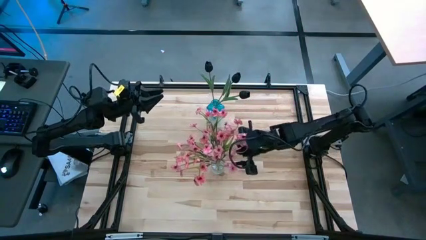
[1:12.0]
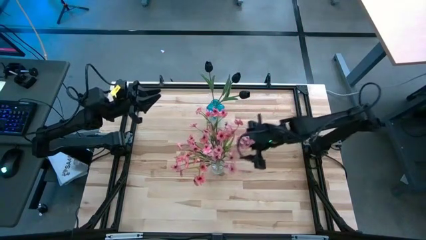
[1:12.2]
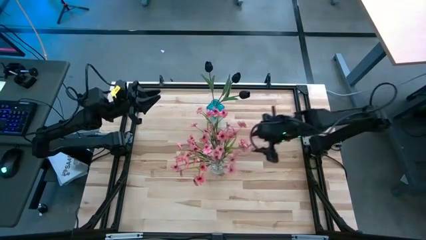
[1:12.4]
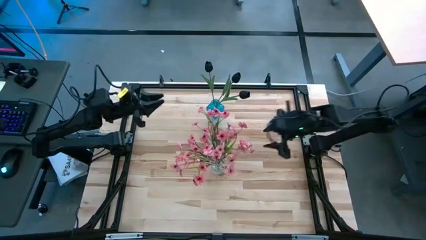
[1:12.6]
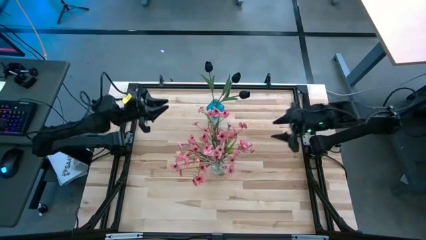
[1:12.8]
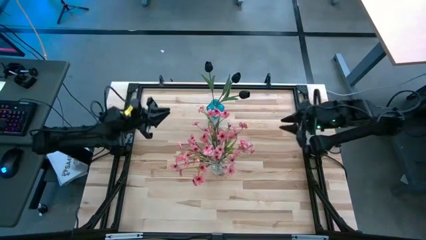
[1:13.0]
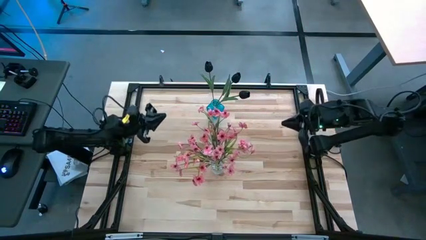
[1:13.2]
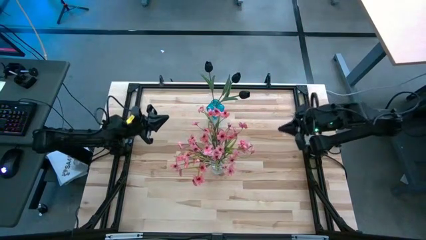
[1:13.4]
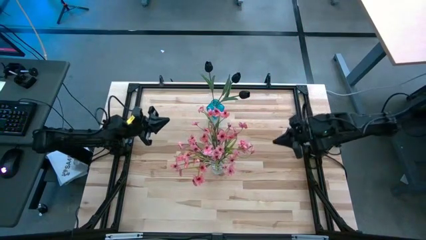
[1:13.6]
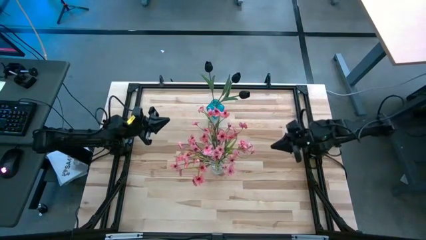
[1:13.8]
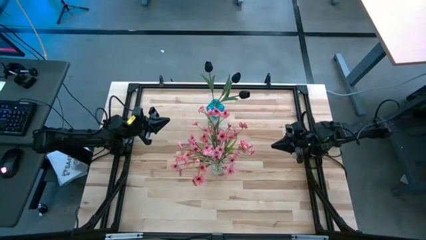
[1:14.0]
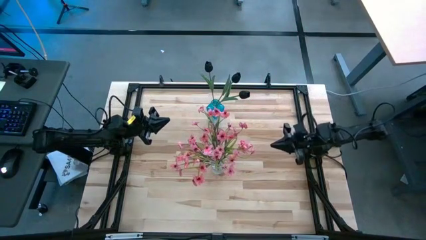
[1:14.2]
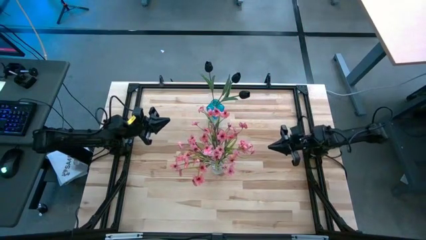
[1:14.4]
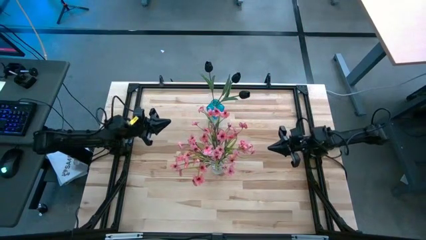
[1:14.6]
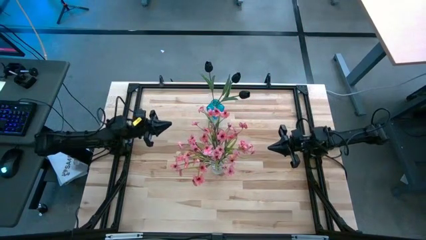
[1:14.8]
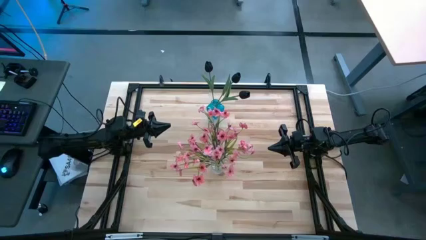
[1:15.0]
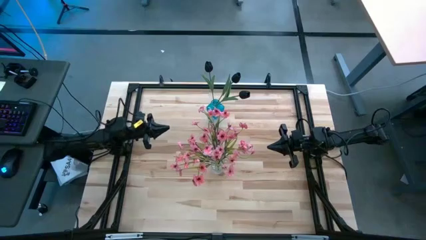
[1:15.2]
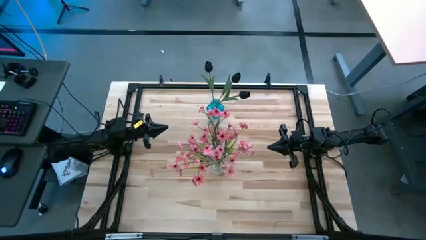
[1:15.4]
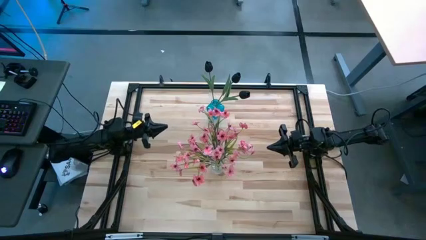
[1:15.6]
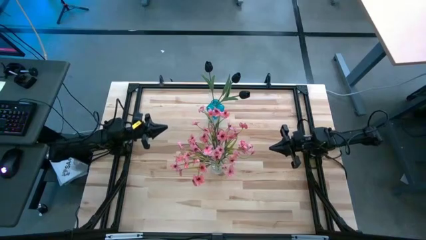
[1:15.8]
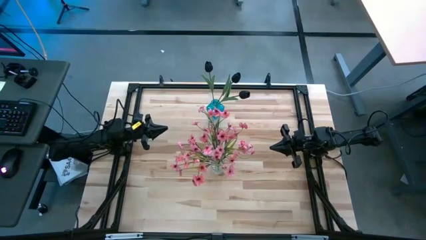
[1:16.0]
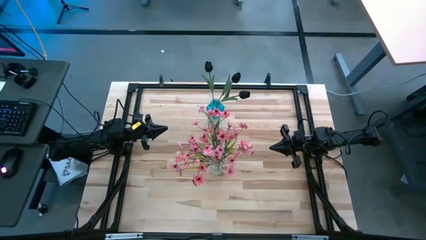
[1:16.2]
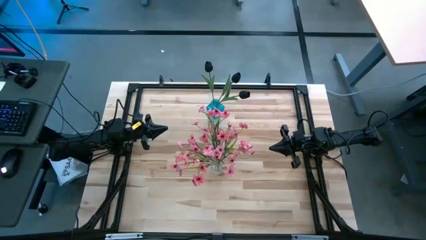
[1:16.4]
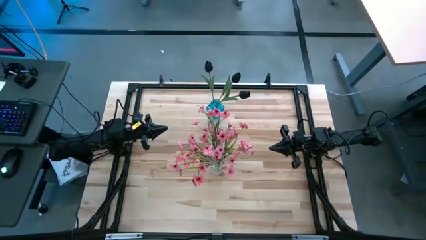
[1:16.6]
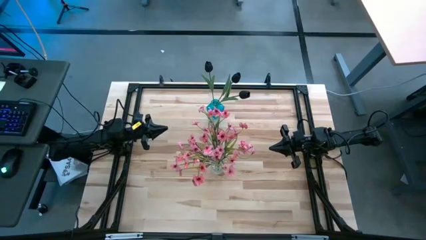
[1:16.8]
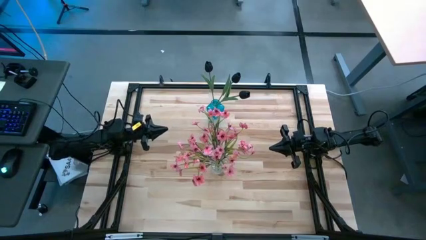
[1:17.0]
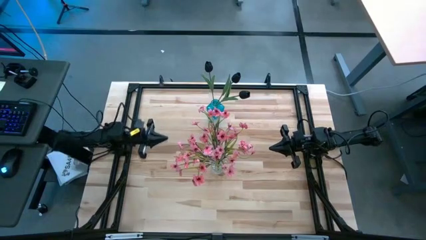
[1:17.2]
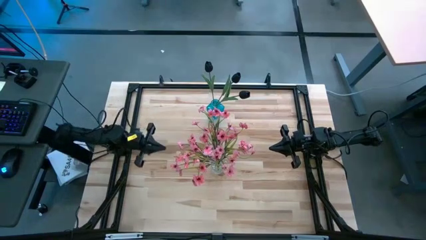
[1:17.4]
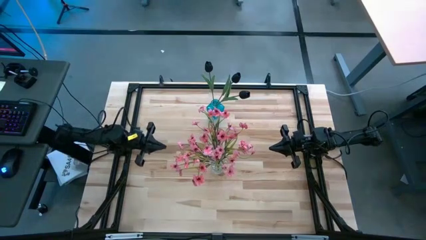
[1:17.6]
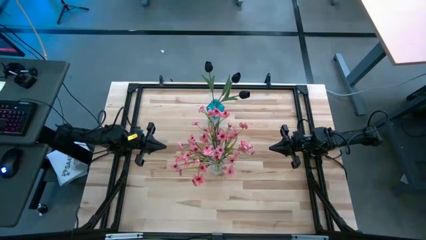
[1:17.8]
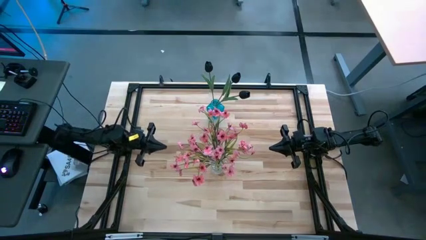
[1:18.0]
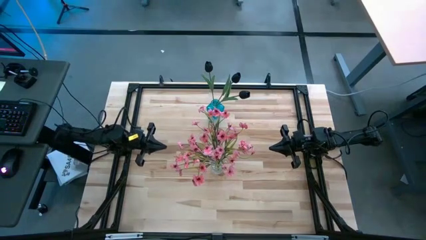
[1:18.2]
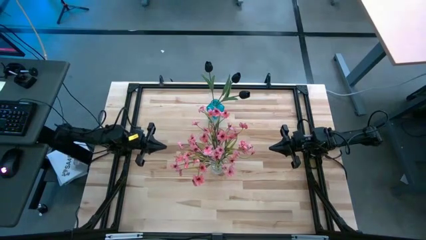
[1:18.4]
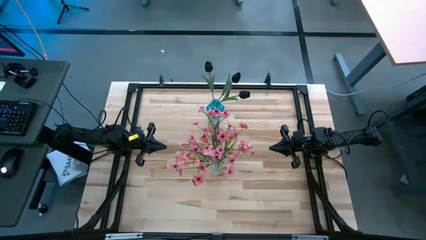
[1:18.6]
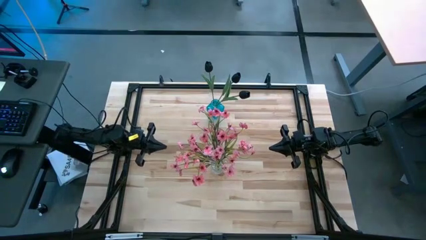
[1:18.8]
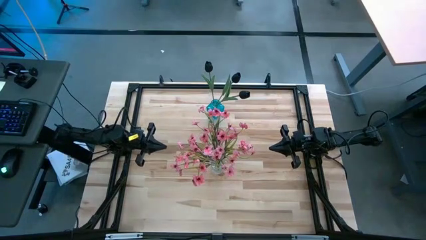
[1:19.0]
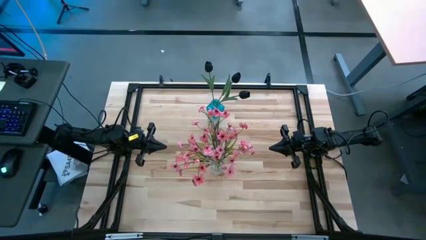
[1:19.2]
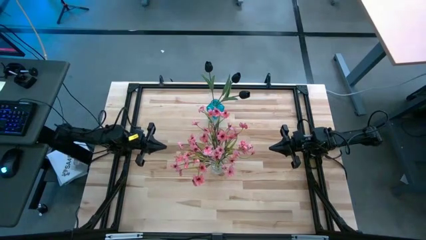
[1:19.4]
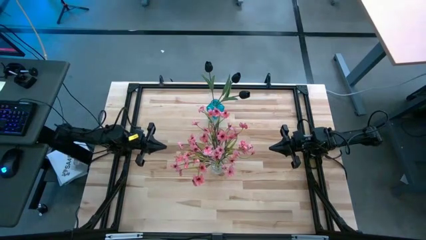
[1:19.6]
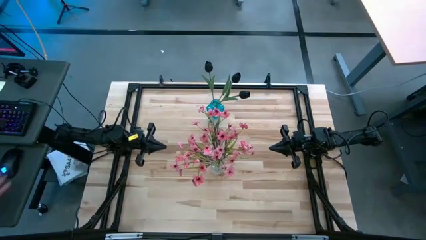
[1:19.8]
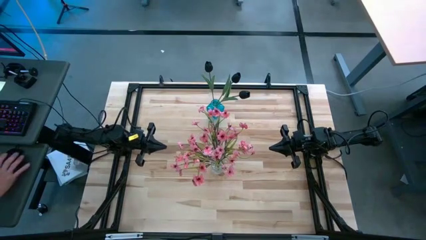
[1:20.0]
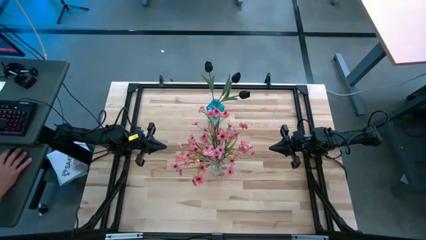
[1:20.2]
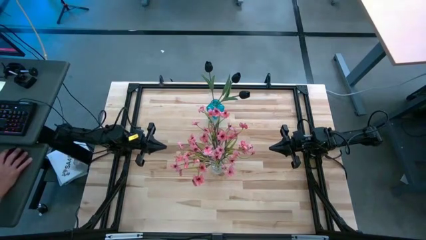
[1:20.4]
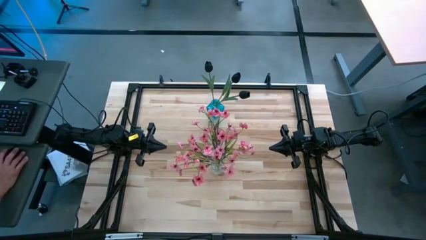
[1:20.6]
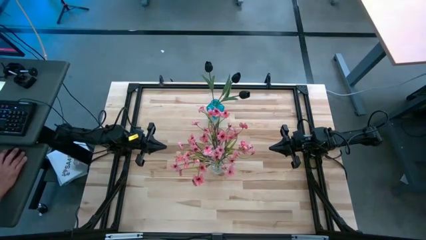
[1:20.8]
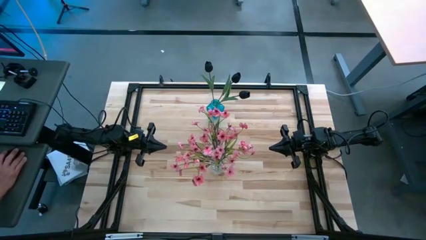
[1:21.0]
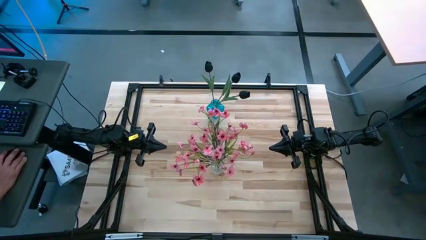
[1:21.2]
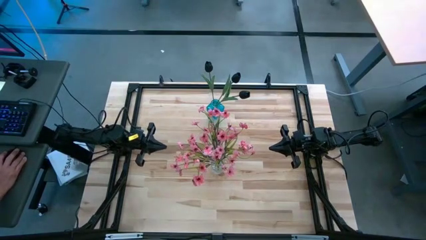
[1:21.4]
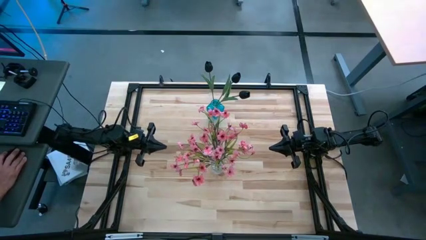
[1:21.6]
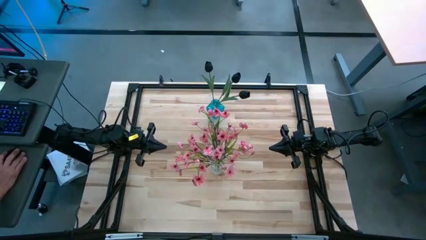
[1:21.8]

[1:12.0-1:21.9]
Task: Sort flowers into vase by color
Return to Home Position
